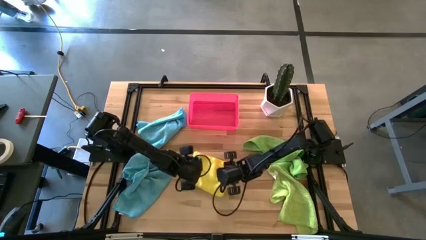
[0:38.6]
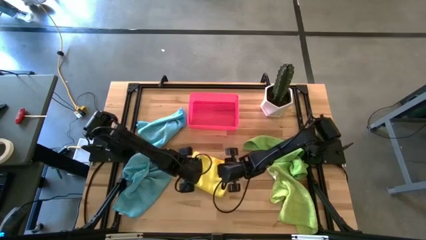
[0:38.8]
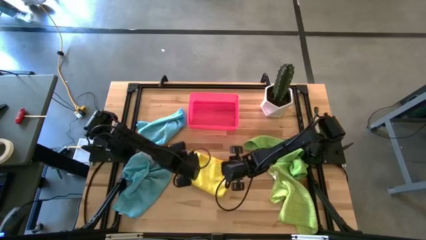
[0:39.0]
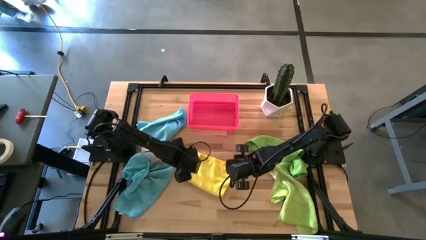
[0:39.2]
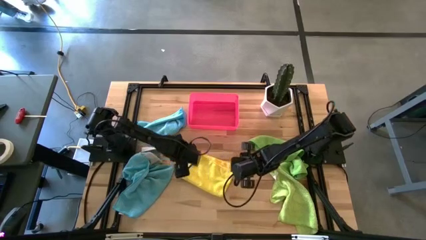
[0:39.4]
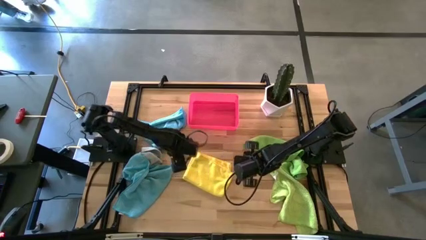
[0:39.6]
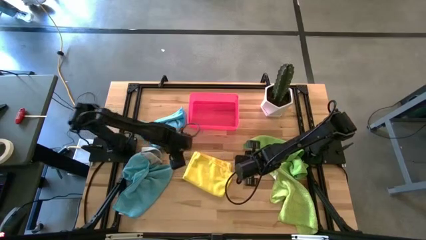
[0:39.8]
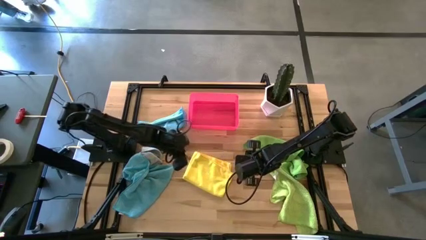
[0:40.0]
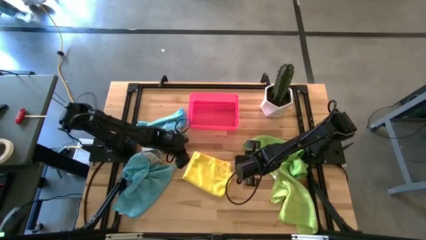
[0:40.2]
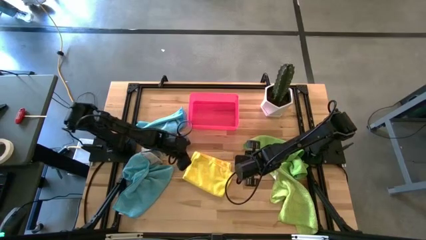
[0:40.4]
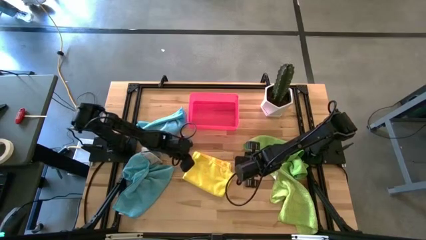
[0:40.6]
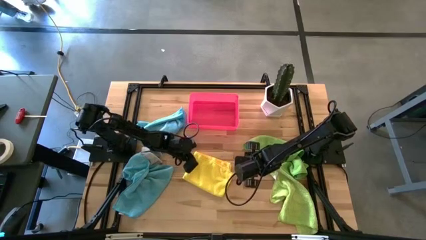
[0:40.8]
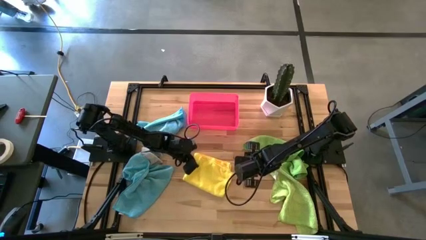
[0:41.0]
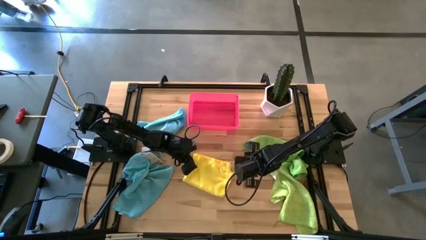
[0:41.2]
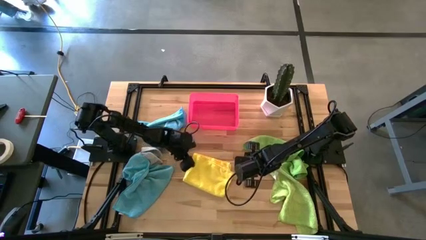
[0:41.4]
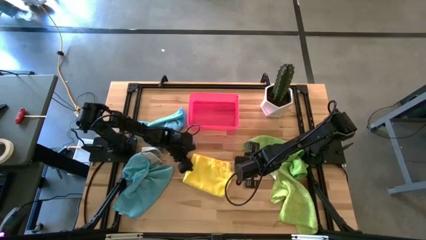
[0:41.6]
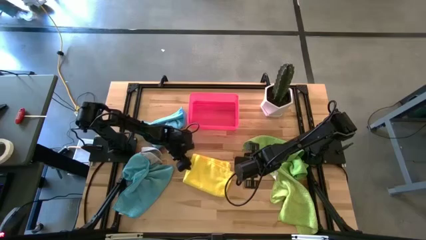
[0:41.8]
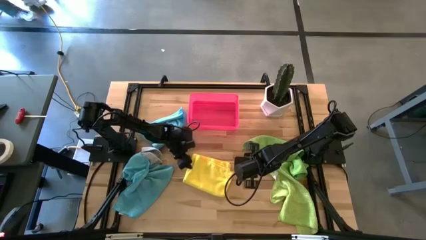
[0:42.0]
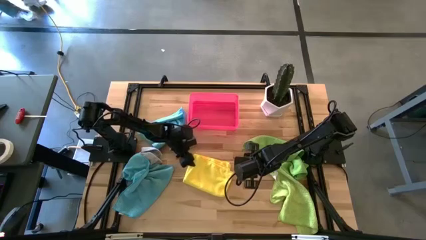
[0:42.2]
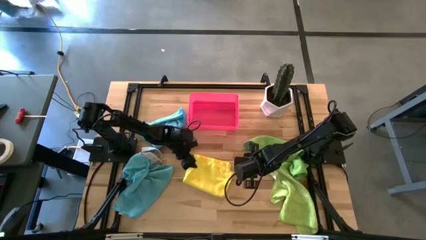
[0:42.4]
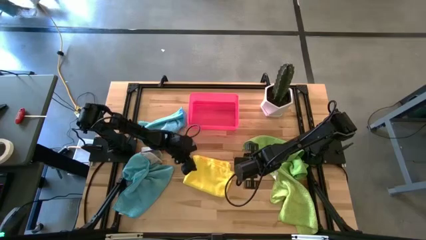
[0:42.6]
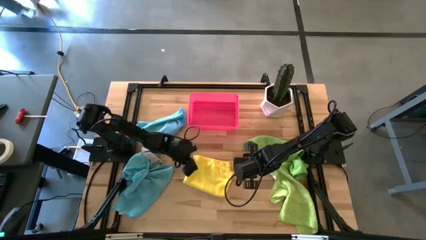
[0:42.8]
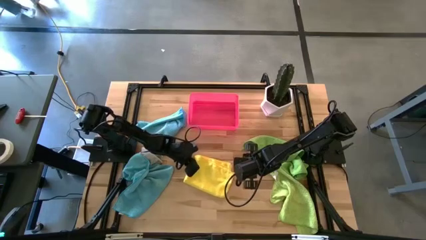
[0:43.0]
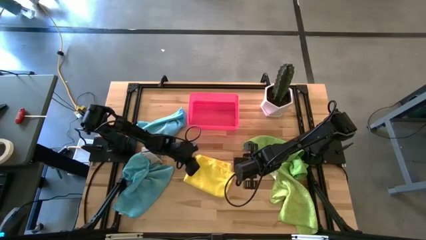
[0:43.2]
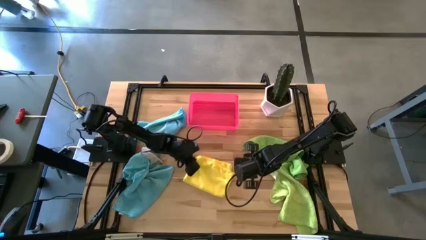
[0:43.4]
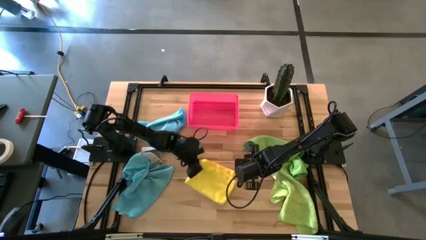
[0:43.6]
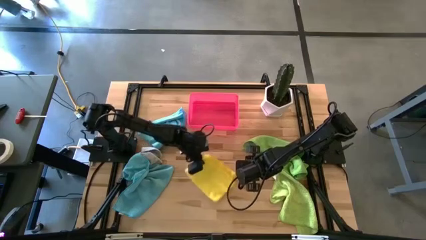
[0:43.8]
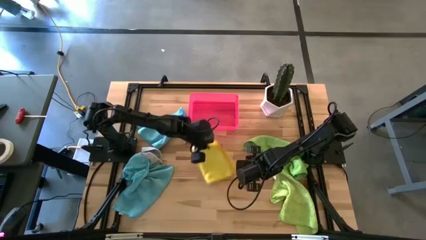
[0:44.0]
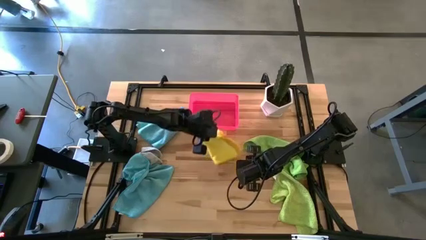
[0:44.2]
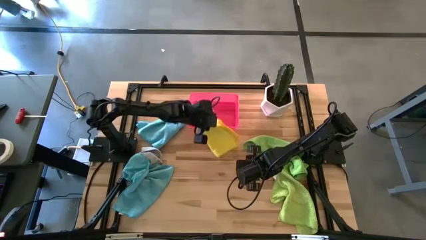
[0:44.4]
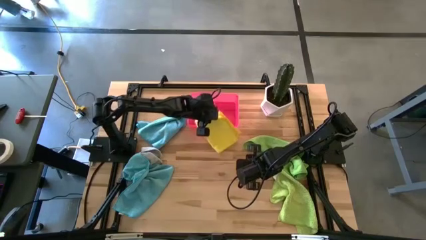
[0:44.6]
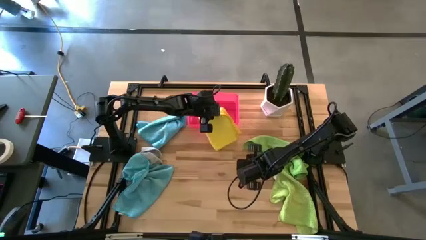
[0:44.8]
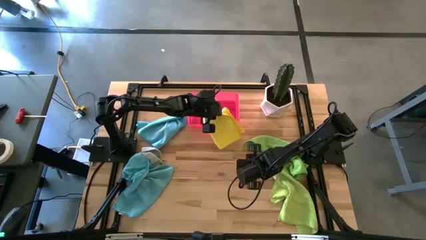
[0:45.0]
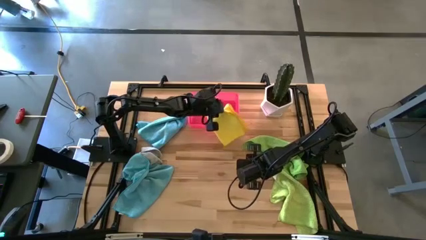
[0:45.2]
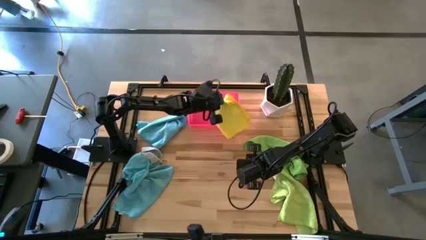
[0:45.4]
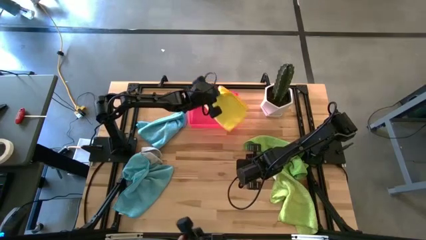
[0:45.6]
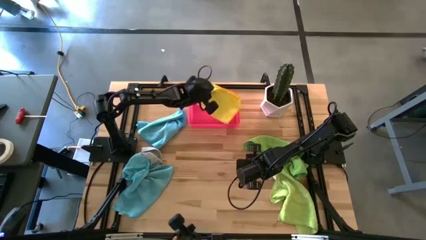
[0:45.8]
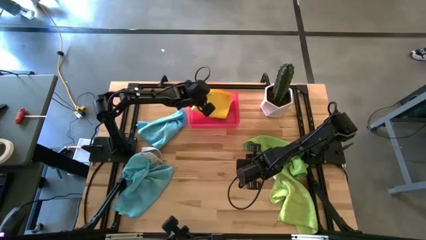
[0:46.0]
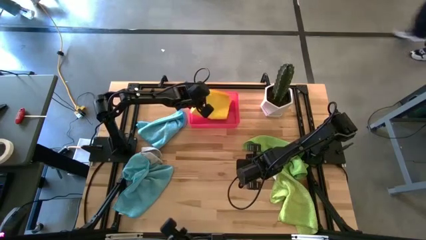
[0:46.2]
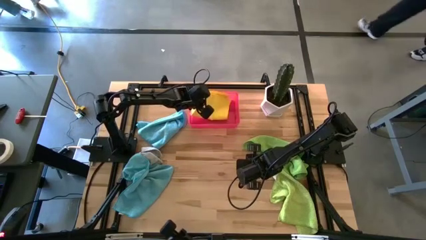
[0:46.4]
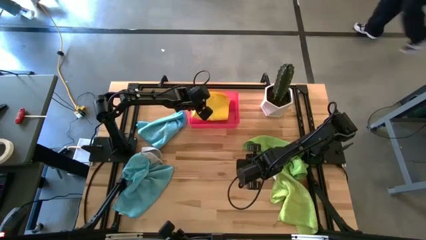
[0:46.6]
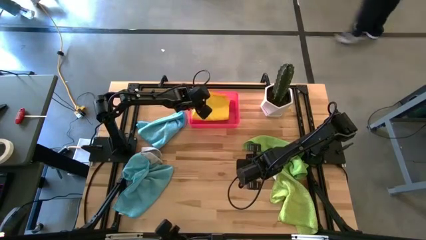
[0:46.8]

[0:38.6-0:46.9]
Task: Fold microfiber towels
Put the folded yellow microfiber cloth into the pink bin

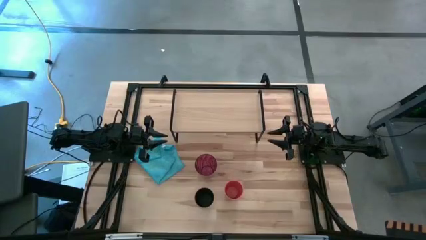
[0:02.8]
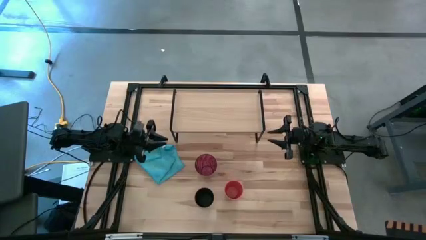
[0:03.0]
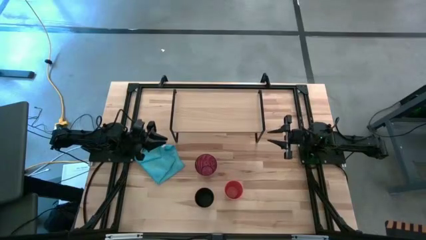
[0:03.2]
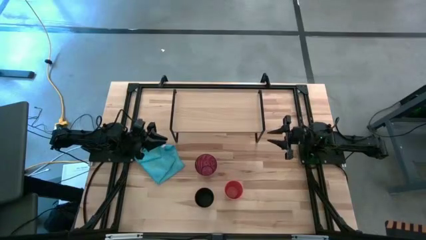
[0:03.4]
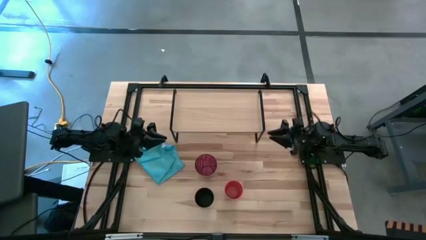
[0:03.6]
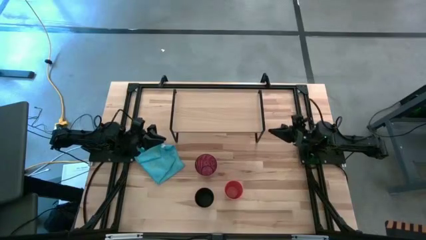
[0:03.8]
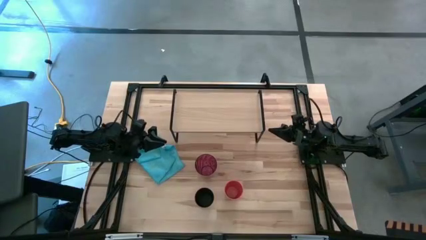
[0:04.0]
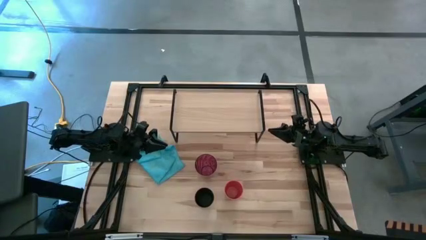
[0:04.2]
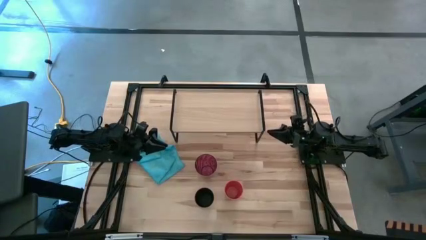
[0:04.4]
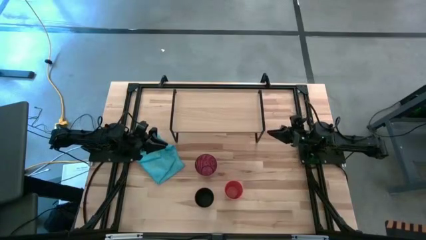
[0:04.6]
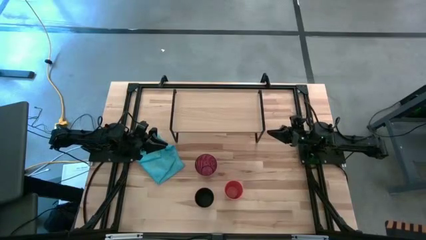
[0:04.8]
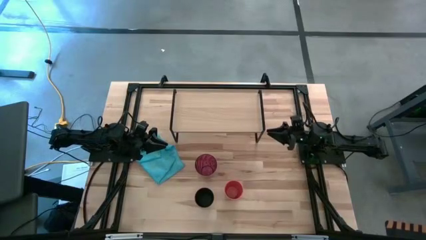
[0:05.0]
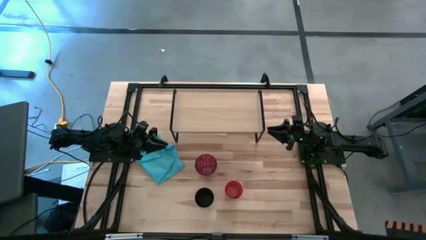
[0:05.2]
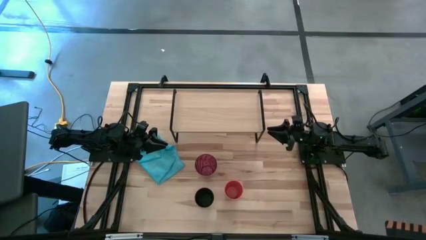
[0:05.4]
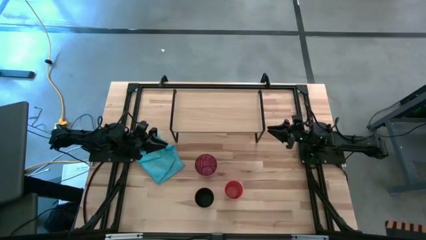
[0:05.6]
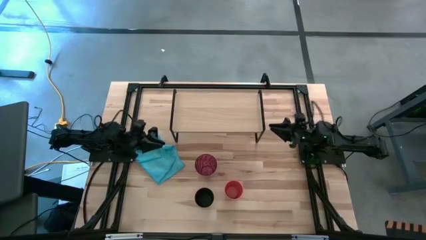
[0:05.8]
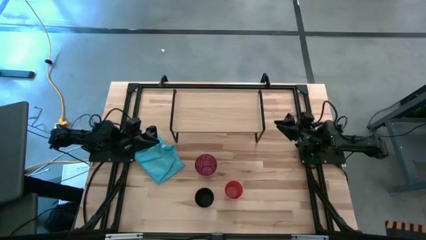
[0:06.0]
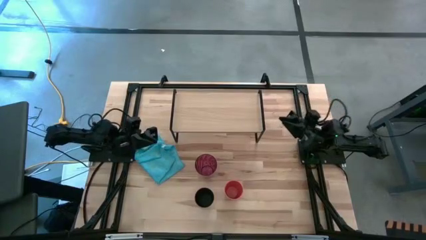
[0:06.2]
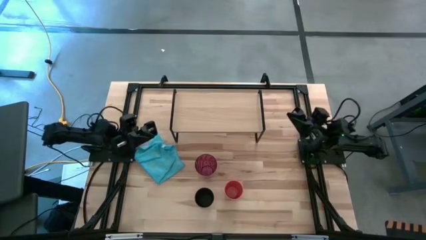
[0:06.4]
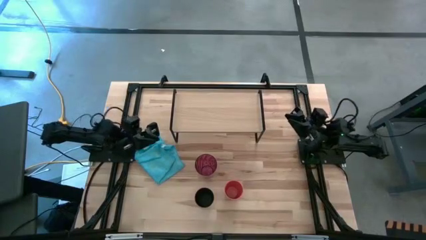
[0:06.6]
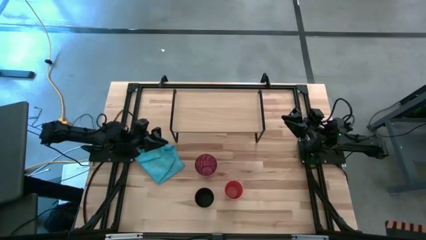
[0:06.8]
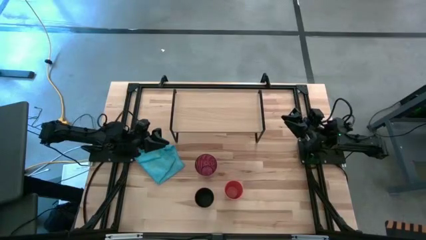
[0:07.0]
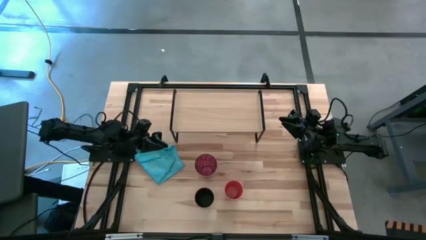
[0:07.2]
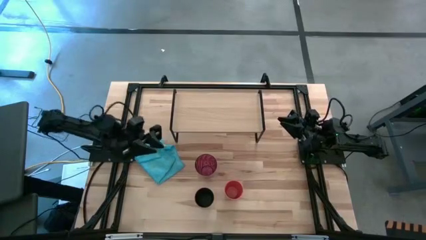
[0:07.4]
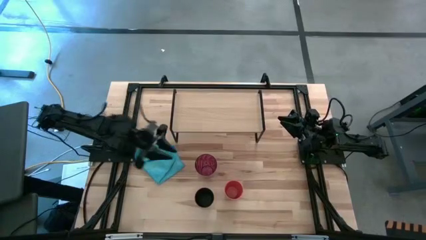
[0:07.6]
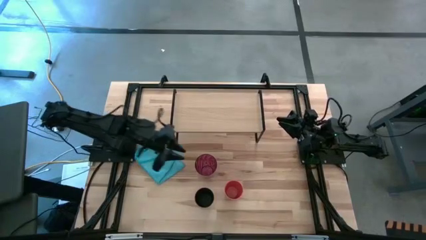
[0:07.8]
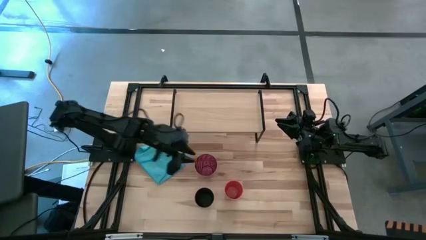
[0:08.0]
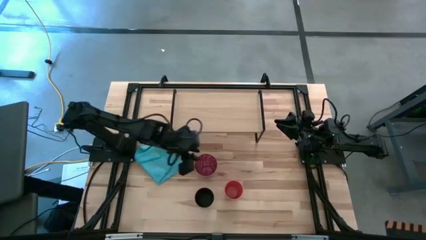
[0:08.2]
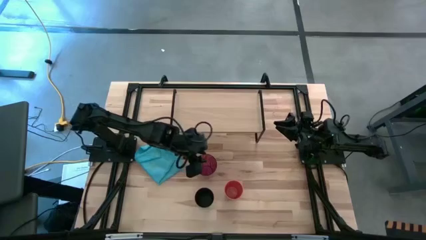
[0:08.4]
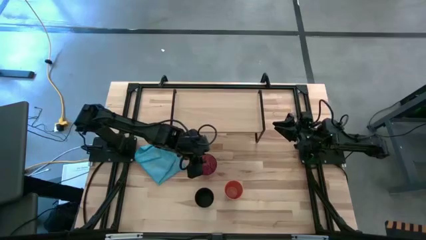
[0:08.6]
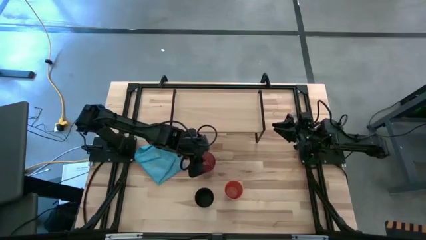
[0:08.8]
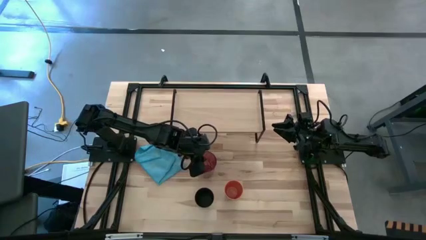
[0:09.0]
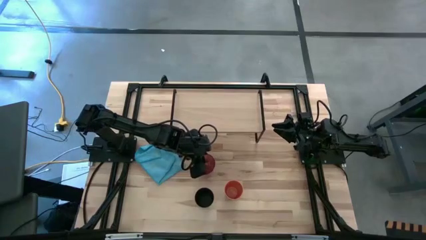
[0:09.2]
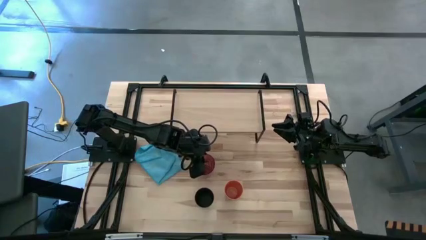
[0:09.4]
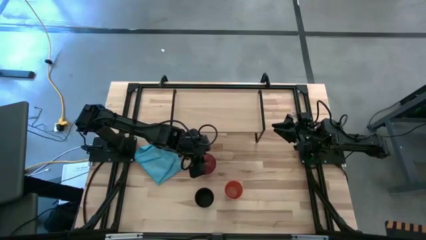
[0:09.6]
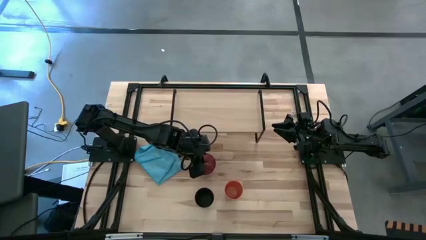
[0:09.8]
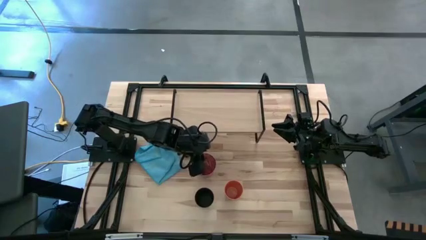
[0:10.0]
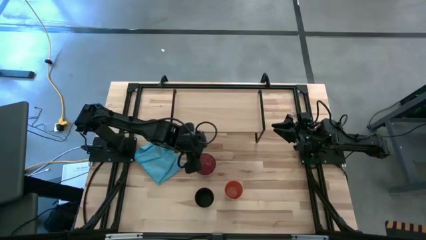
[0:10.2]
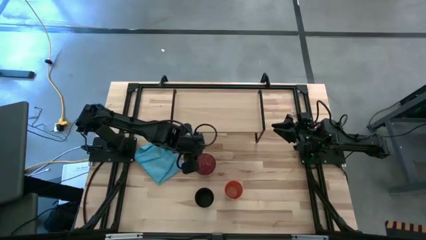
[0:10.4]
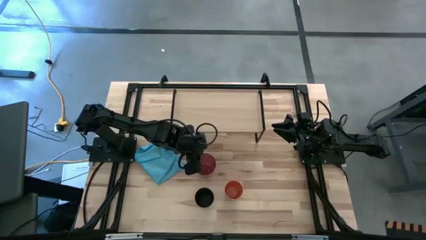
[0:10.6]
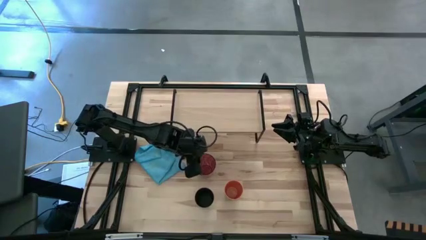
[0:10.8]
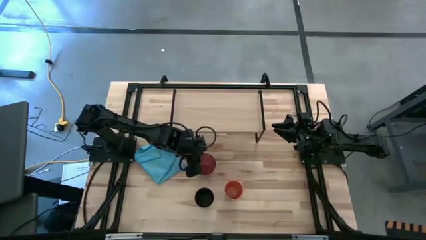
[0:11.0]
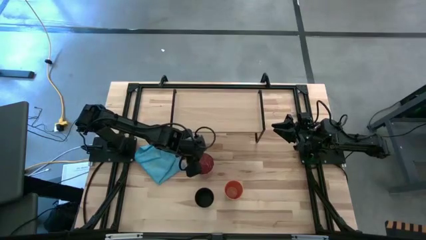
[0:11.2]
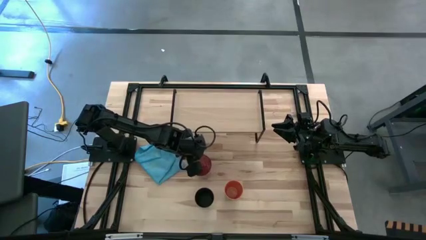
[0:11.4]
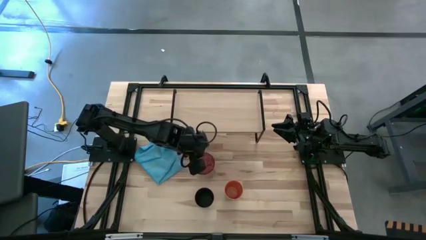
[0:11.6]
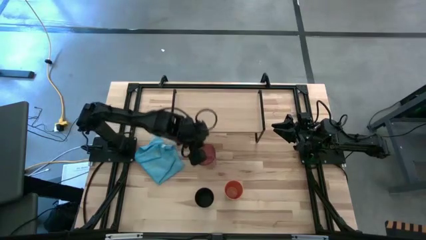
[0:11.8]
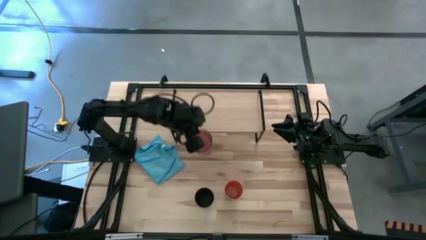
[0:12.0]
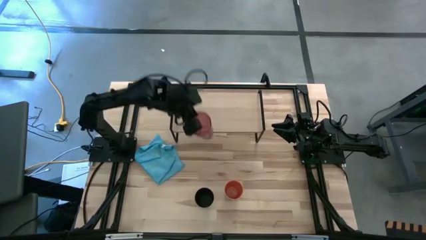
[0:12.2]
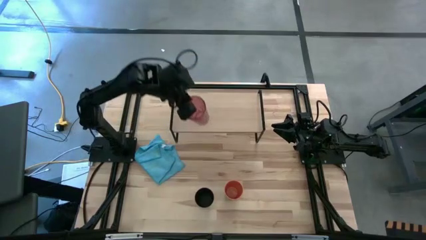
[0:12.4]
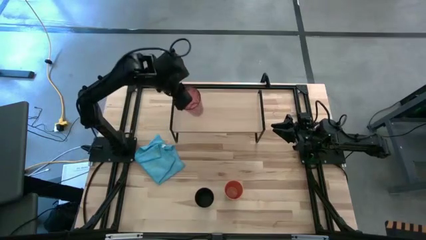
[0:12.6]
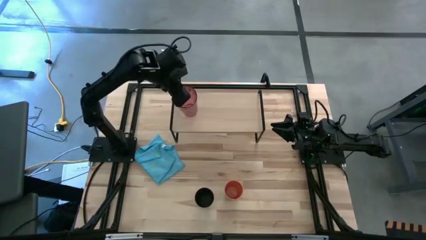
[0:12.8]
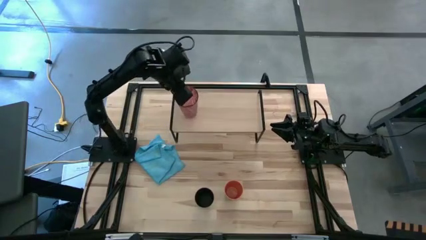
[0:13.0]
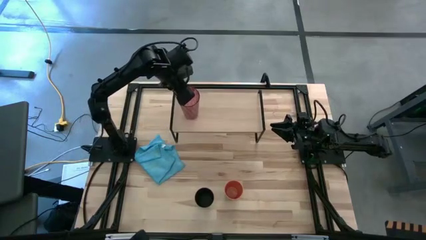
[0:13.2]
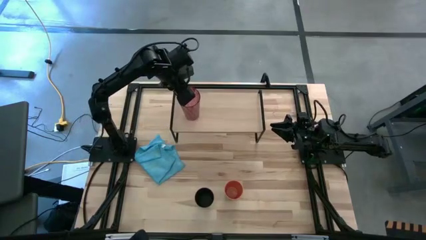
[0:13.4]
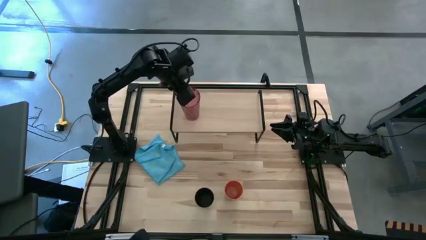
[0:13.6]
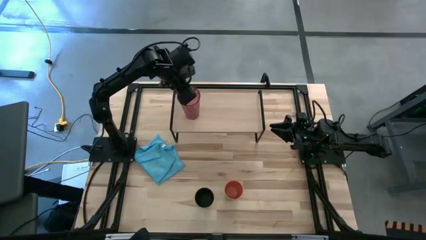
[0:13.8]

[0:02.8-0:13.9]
Task: Stack small to large cups/mugs on shelf
Put the red cup on the shelf
